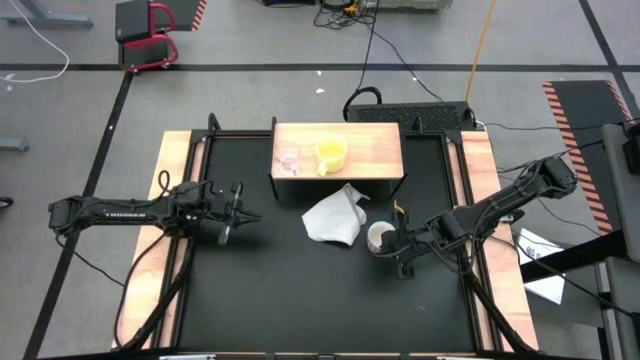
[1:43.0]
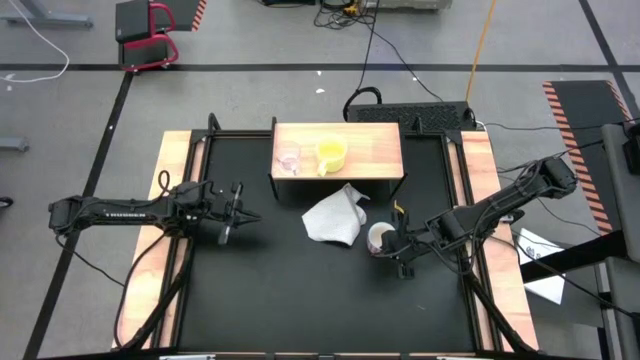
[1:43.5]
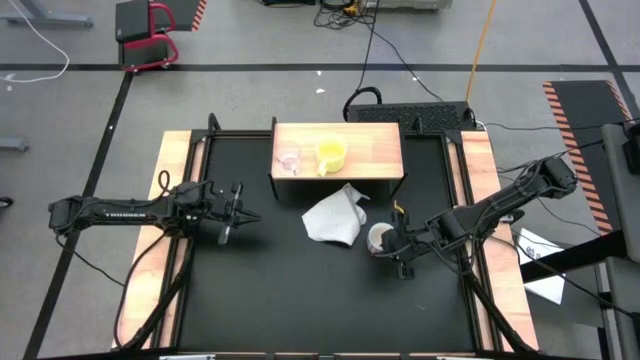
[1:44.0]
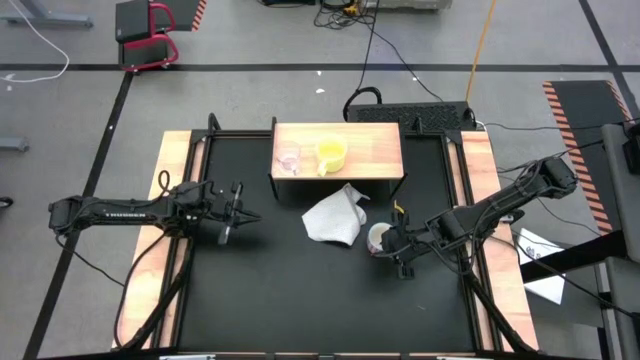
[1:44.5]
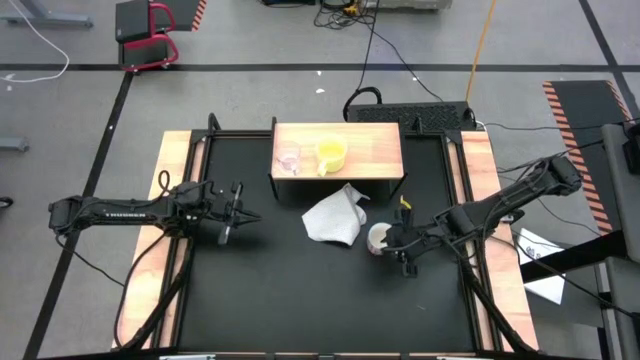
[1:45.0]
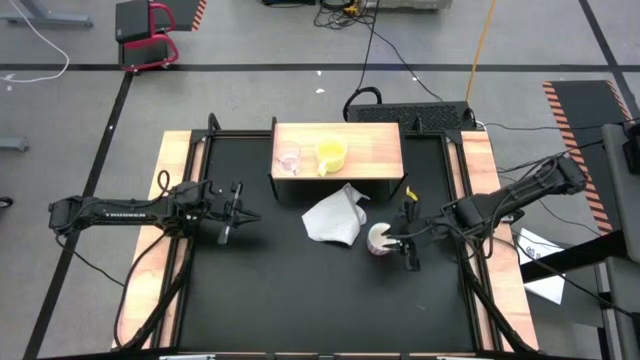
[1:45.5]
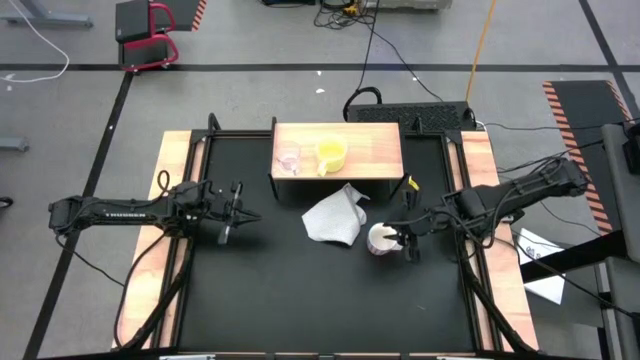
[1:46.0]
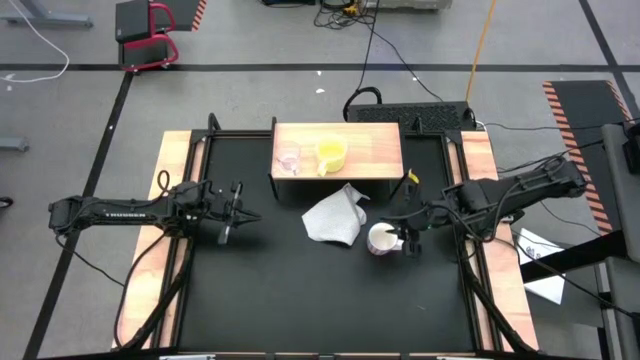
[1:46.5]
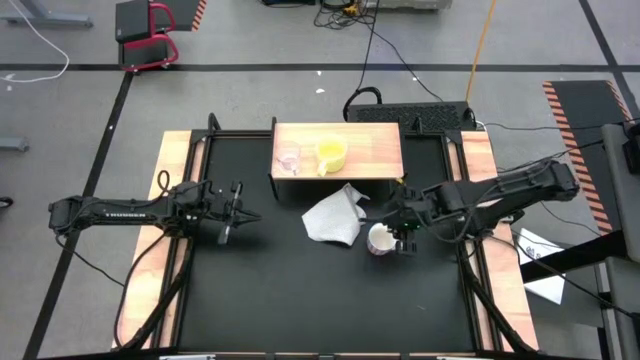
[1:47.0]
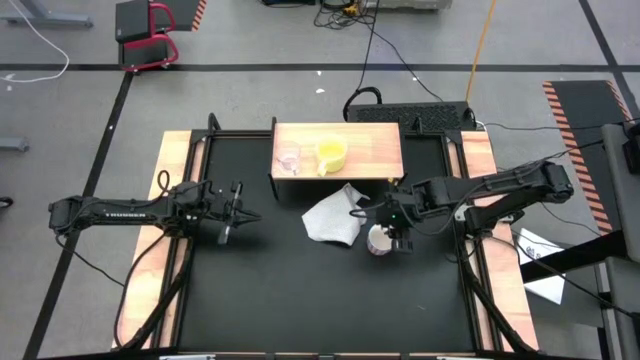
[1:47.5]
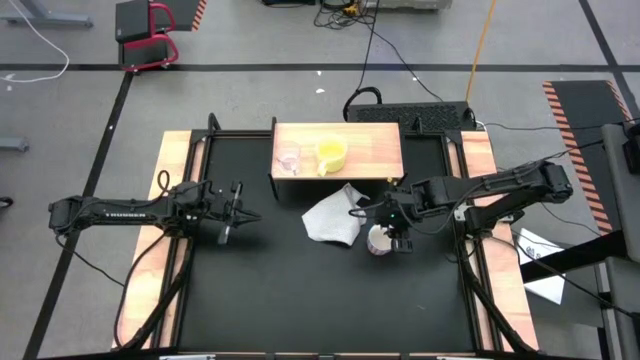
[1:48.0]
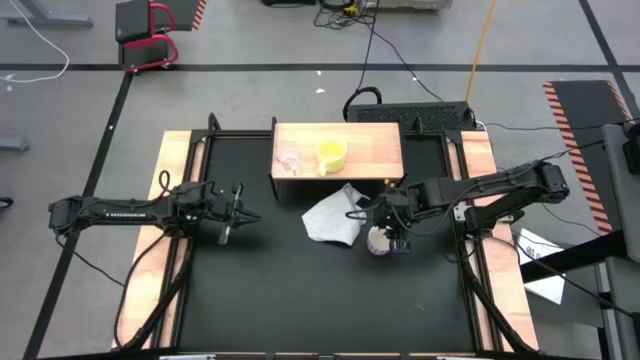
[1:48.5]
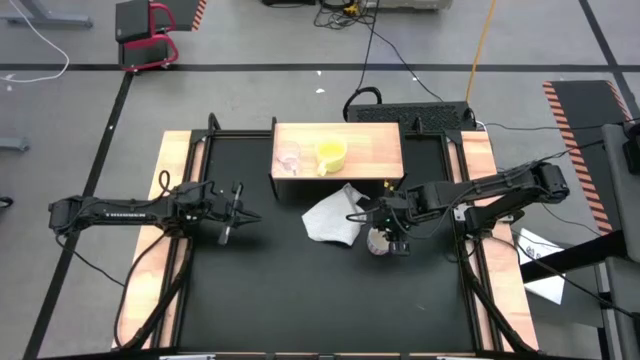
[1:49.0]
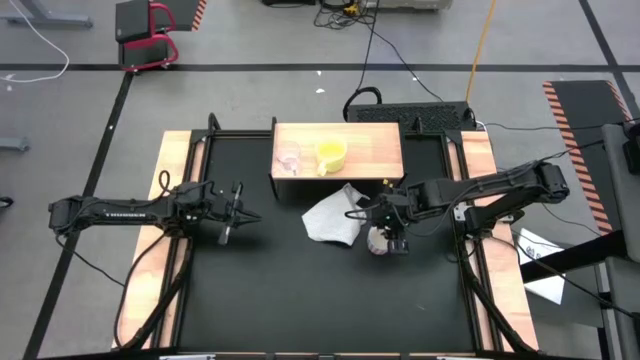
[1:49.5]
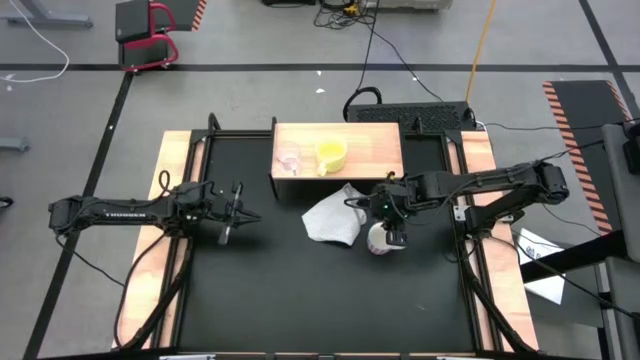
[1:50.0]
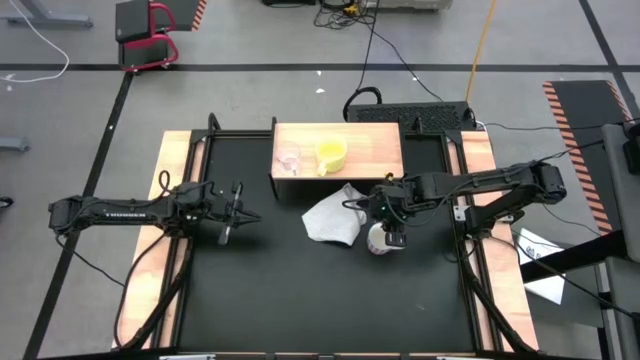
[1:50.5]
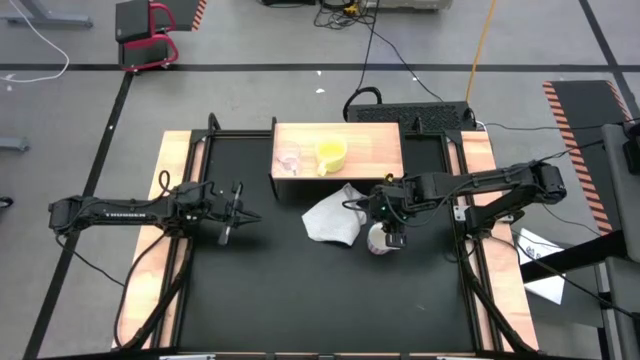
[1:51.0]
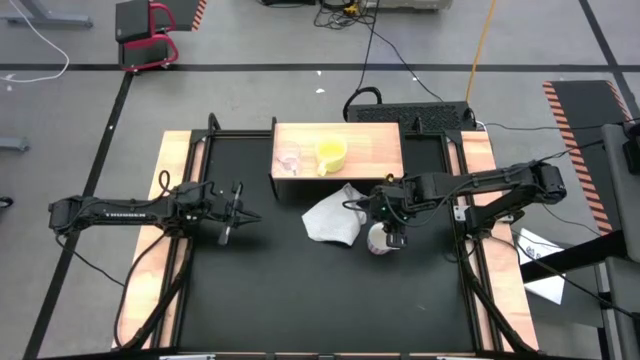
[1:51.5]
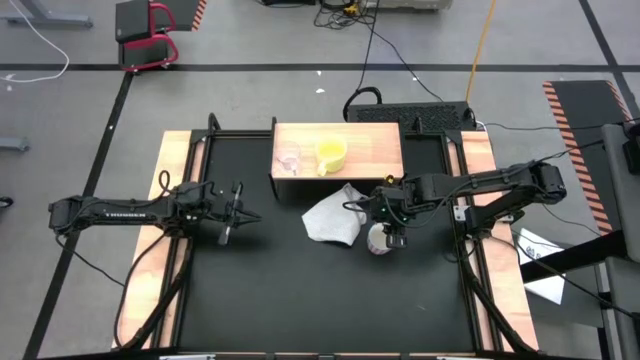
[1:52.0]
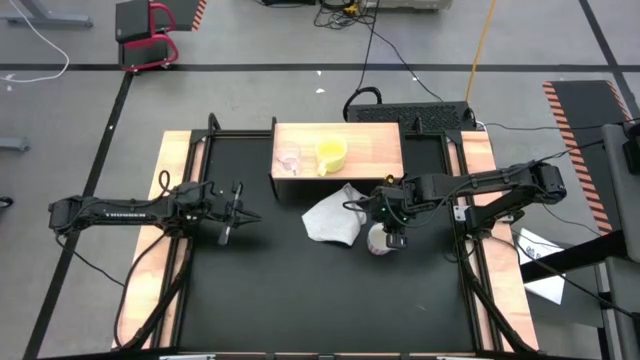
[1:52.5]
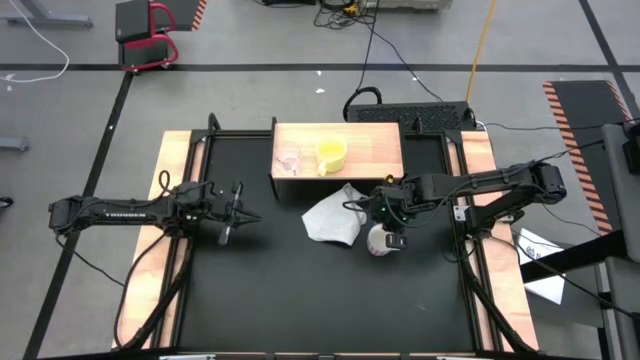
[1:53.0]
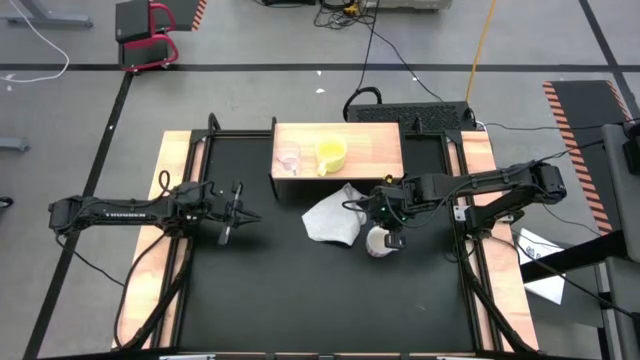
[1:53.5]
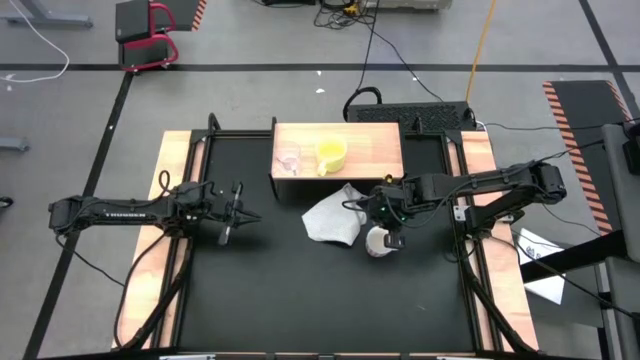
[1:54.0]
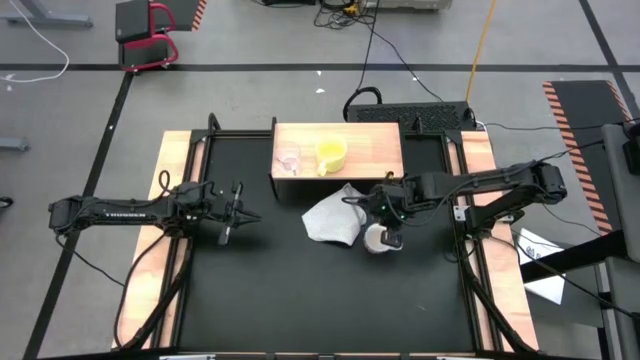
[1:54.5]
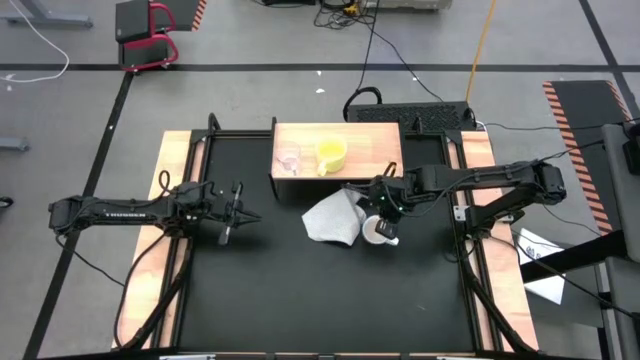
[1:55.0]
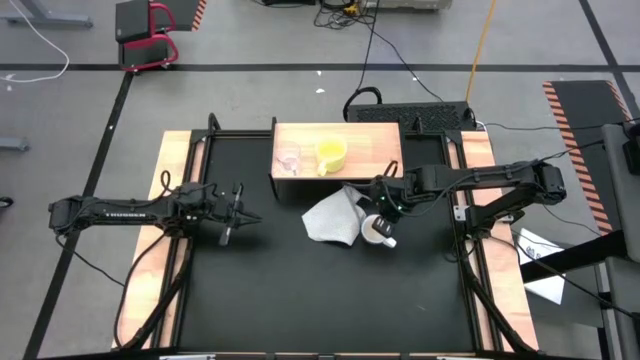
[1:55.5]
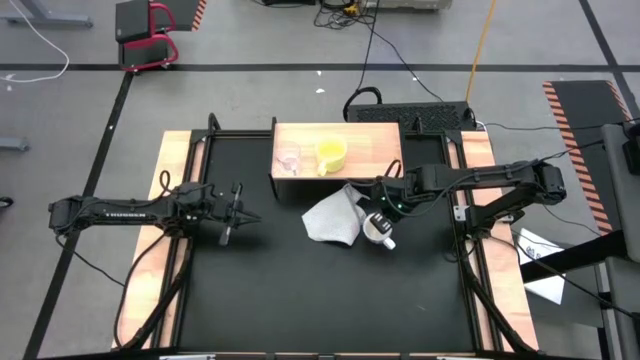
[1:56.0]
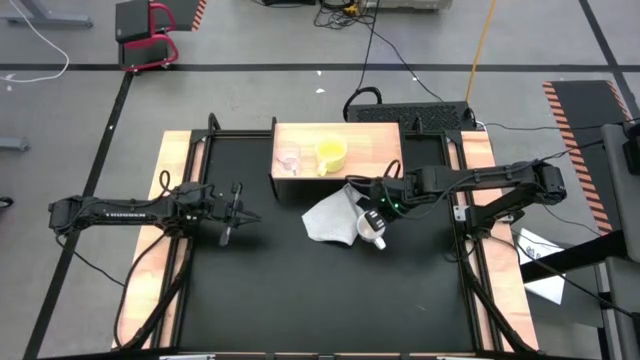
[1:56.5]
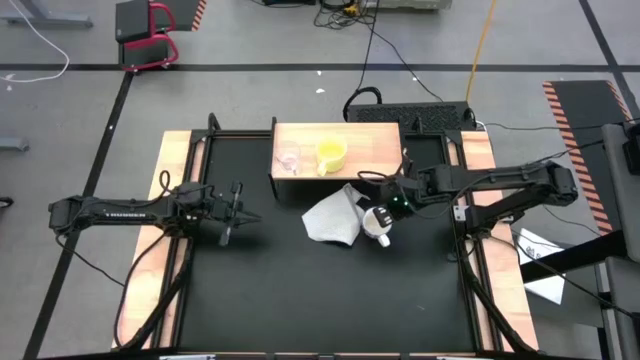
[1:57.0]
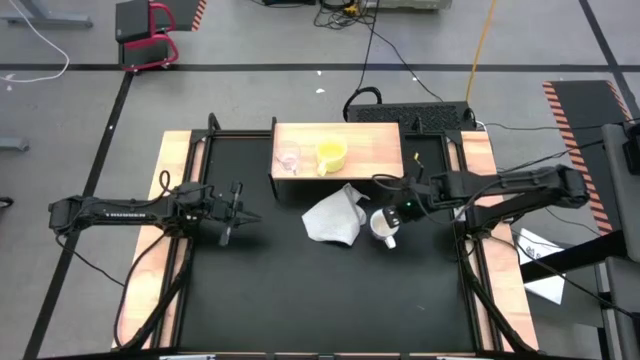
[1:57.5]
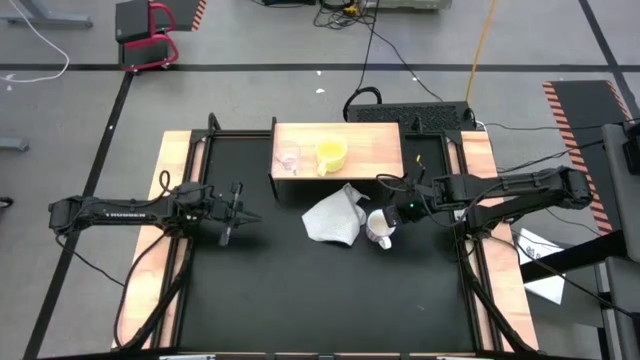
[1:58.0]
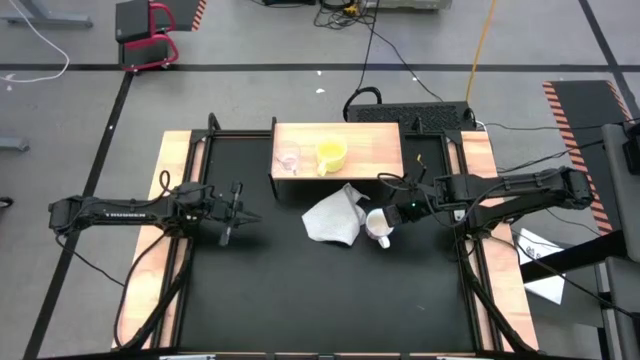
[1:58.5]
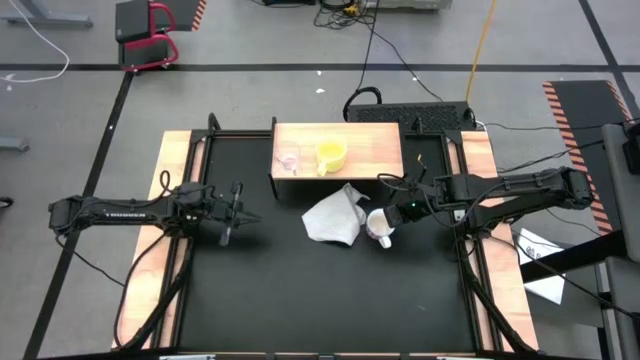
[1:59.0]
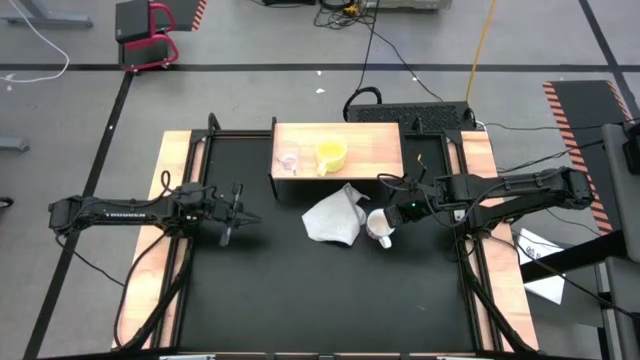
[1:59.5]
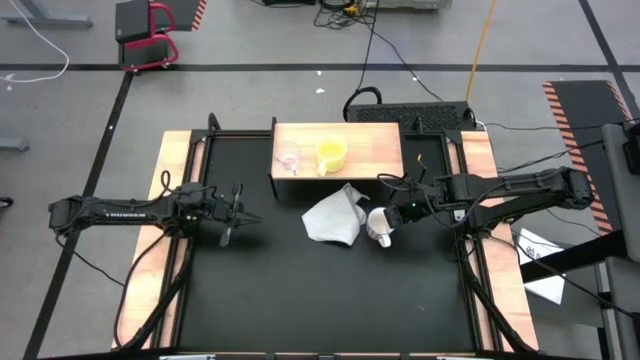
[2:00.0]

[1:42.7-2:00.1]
Task: Stack small to large cups/mugs on shelf
Move the red pattern white mug near the shelf

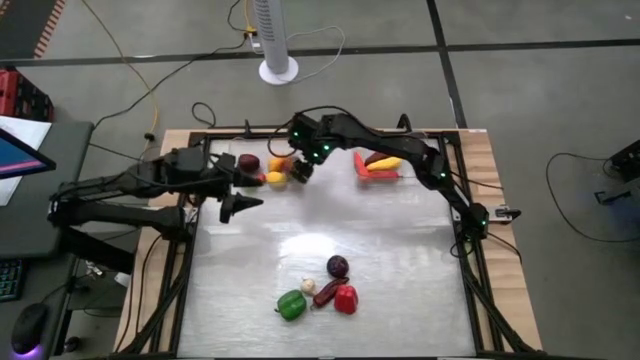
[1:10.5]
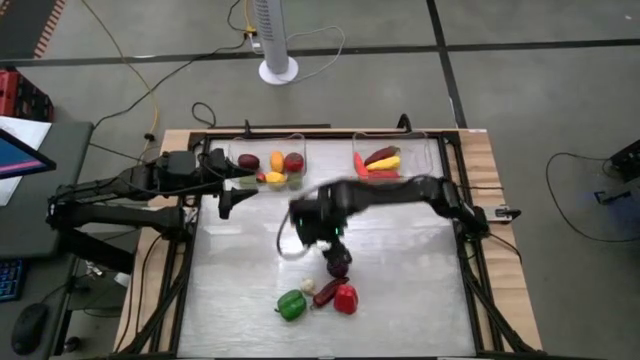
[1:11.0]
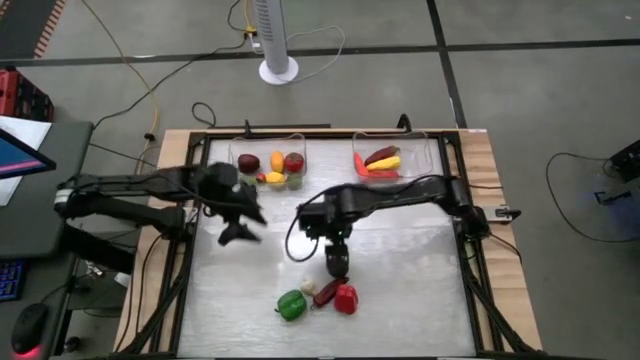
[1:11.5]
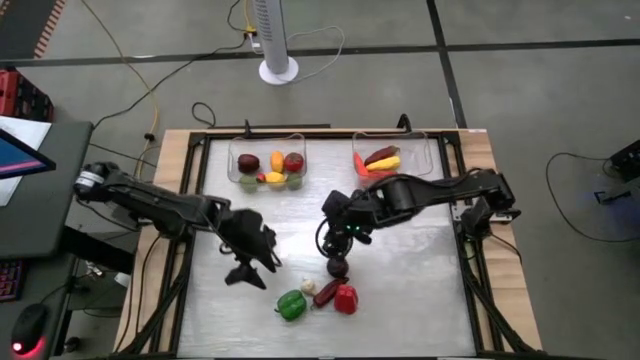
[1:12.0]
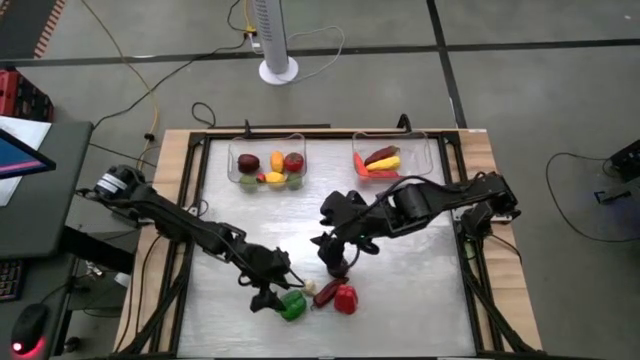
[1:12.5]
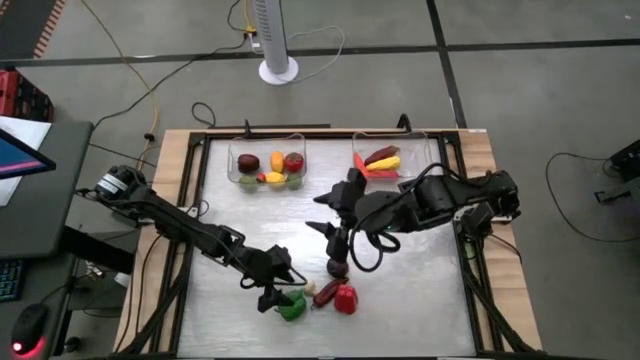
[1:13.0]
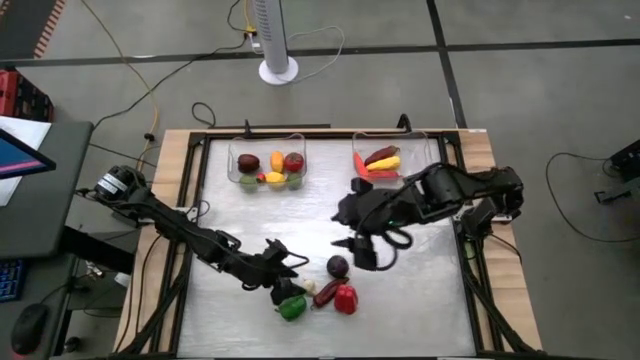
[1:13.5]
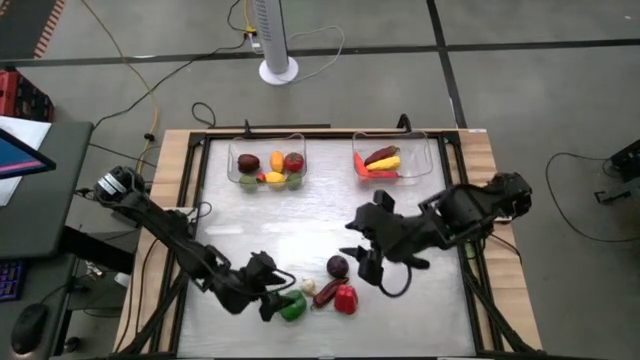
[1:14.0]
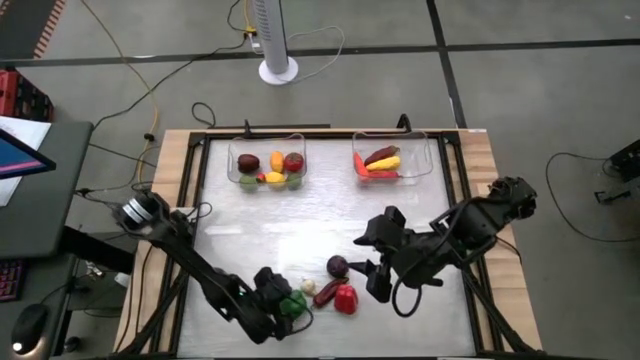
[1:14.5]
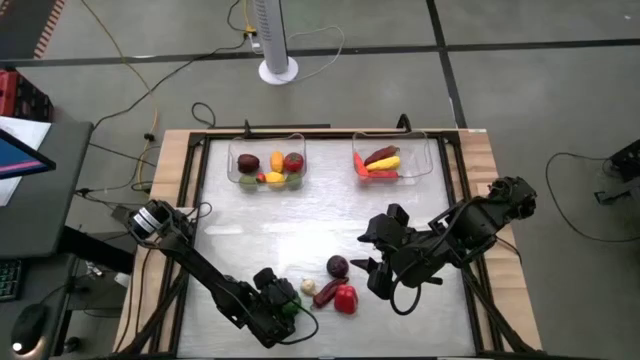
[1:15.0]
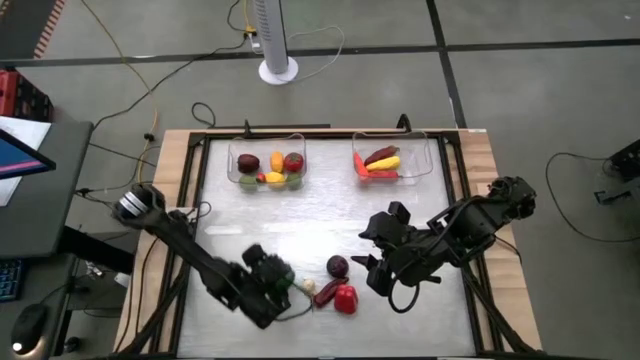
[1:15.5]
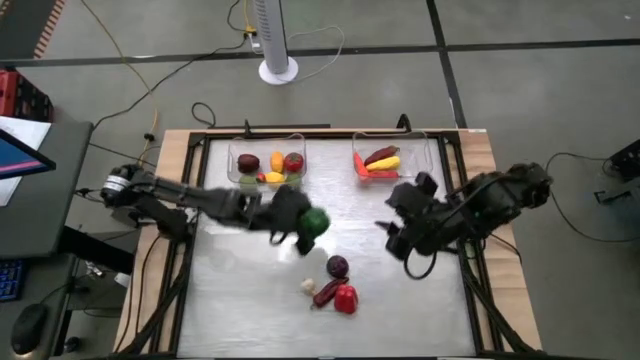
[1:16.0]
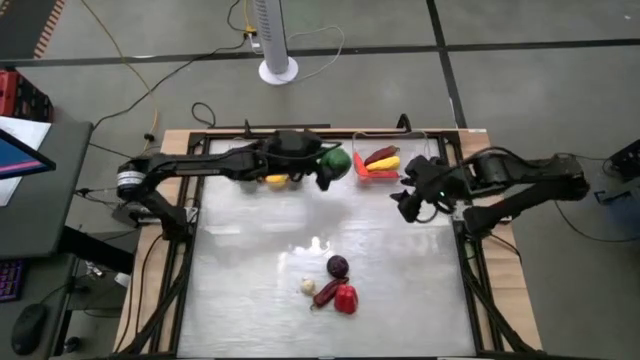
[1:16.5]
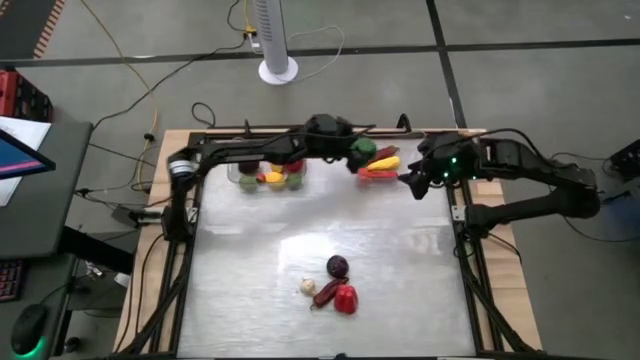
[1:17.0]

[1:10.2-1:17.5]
Task: Sort produce into baskets
Put the green bell pepper into the right transparent bin
